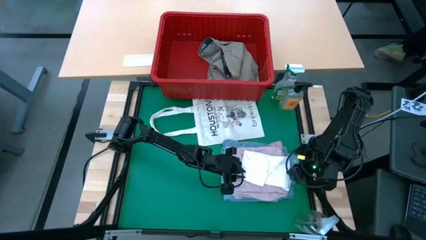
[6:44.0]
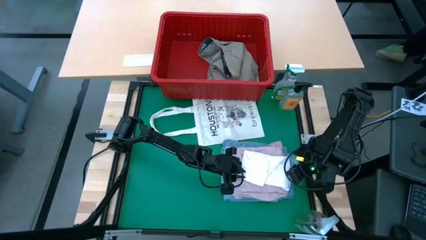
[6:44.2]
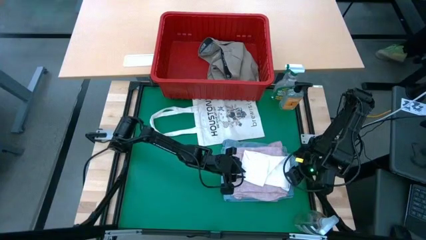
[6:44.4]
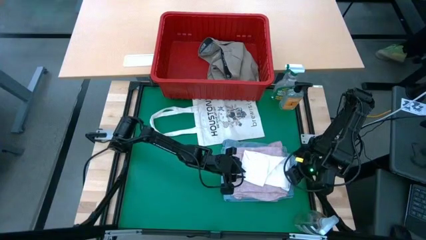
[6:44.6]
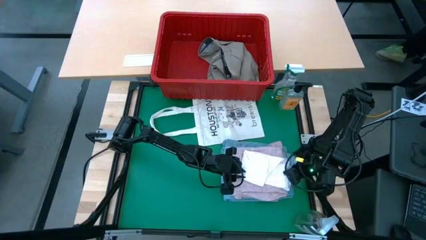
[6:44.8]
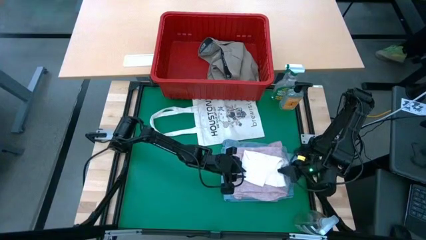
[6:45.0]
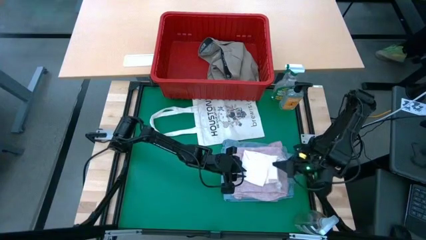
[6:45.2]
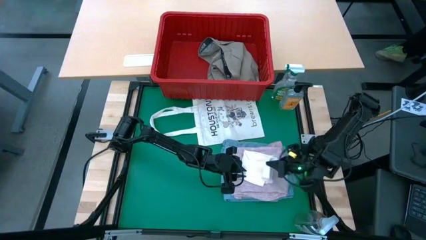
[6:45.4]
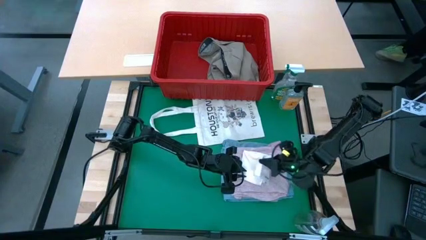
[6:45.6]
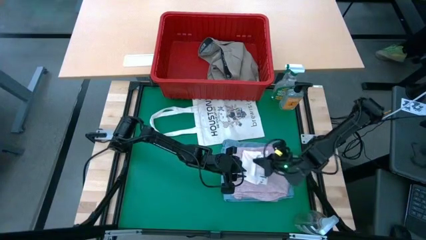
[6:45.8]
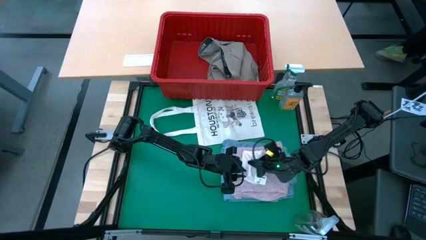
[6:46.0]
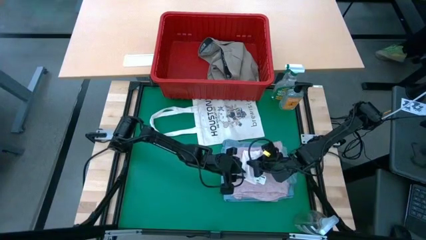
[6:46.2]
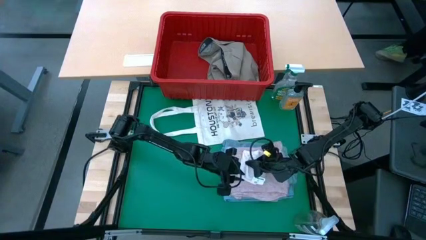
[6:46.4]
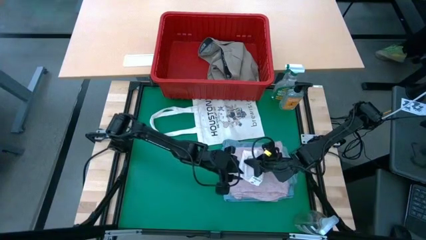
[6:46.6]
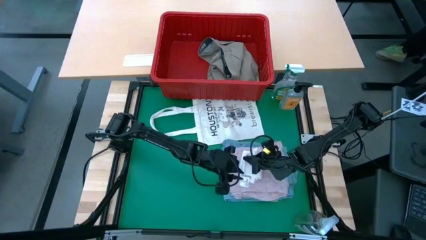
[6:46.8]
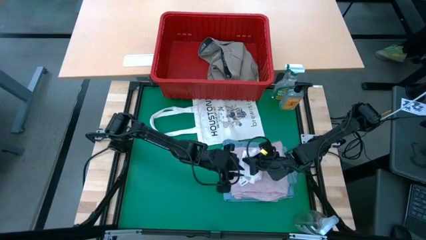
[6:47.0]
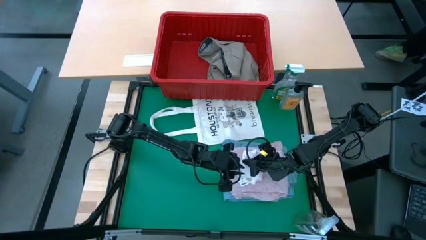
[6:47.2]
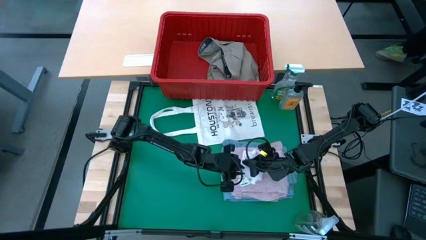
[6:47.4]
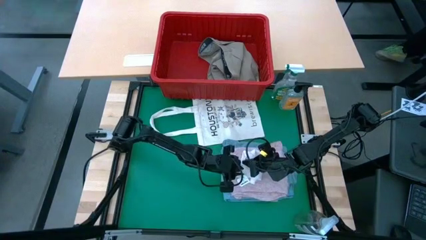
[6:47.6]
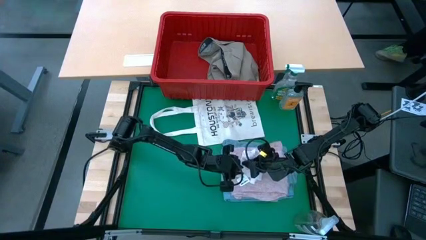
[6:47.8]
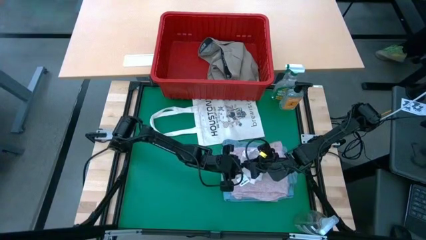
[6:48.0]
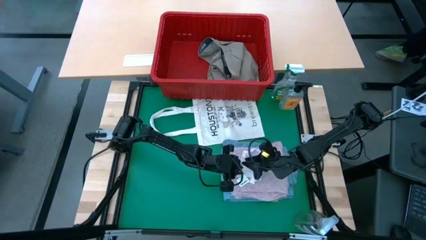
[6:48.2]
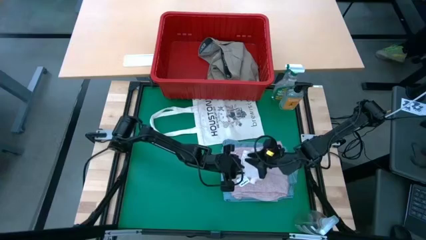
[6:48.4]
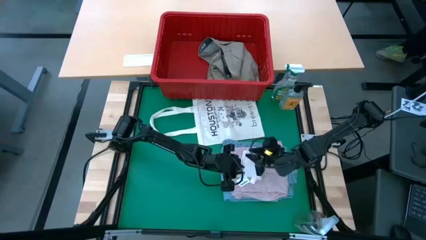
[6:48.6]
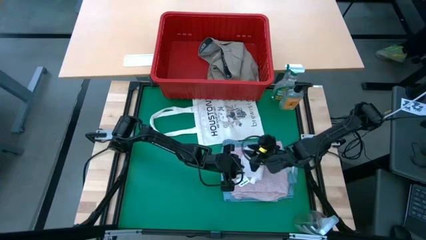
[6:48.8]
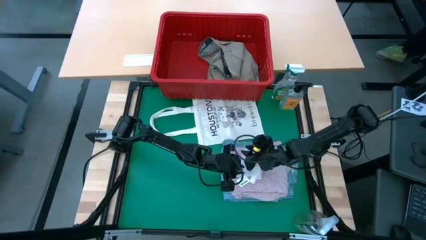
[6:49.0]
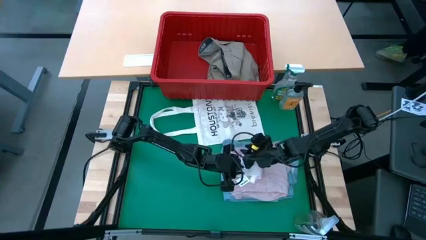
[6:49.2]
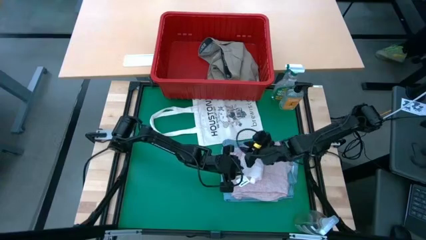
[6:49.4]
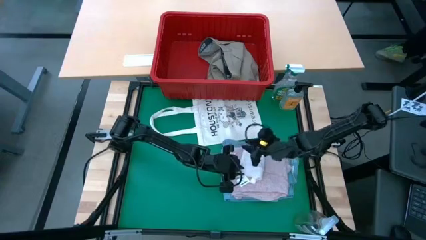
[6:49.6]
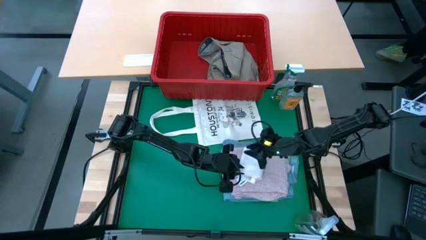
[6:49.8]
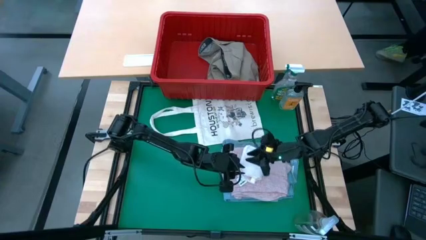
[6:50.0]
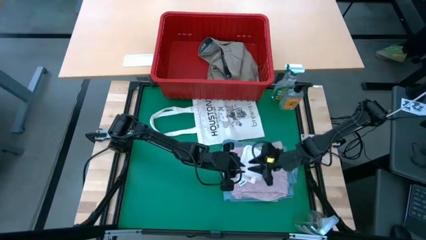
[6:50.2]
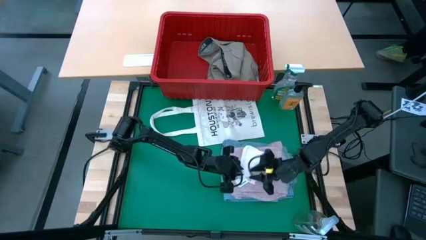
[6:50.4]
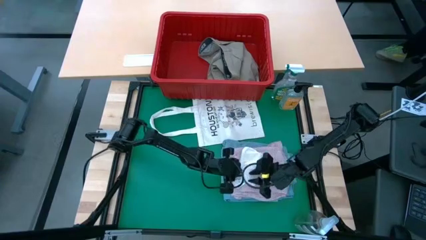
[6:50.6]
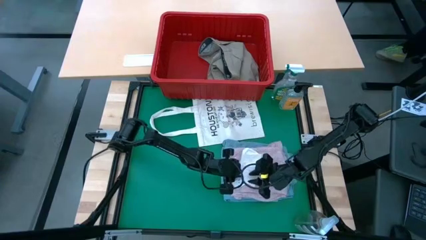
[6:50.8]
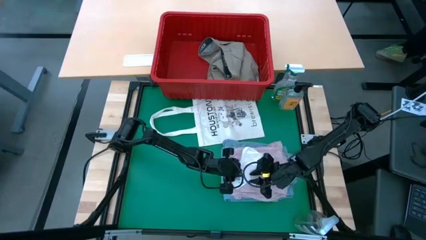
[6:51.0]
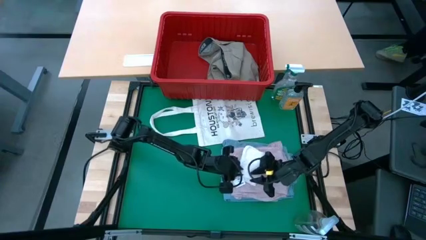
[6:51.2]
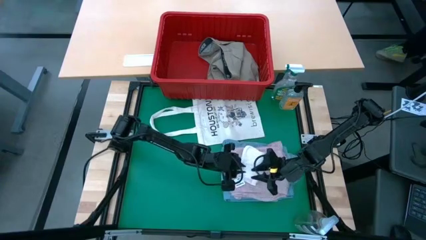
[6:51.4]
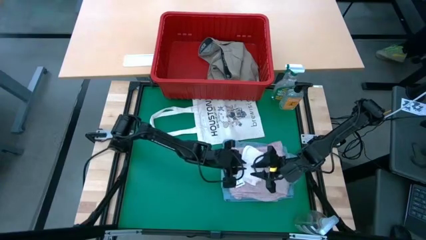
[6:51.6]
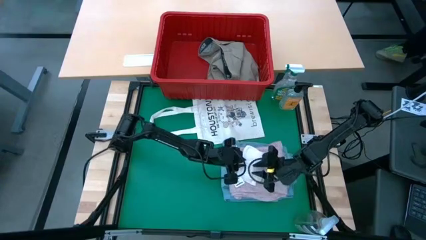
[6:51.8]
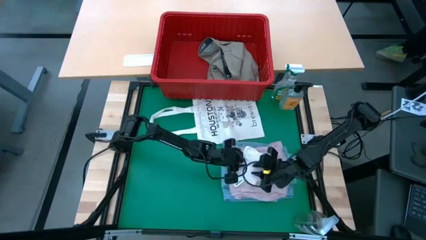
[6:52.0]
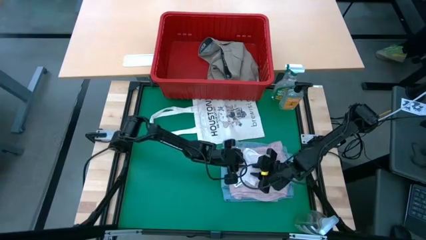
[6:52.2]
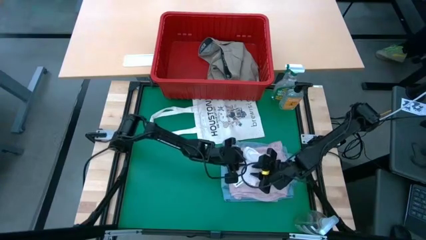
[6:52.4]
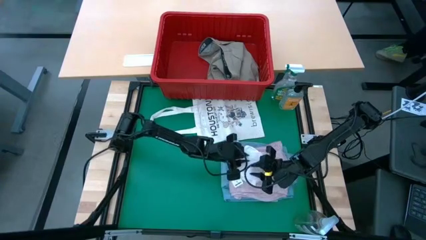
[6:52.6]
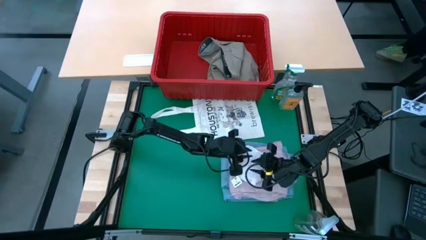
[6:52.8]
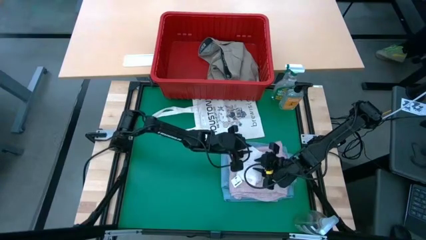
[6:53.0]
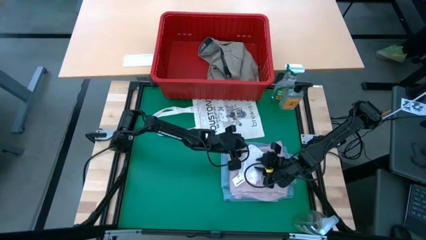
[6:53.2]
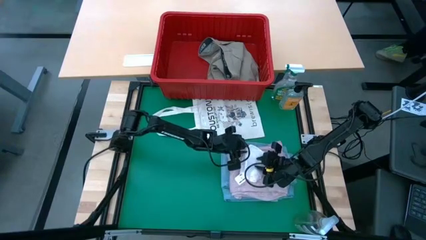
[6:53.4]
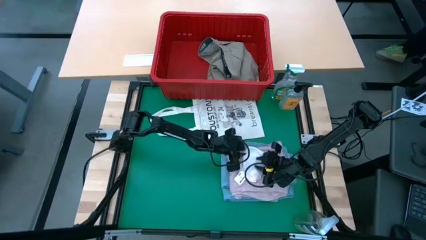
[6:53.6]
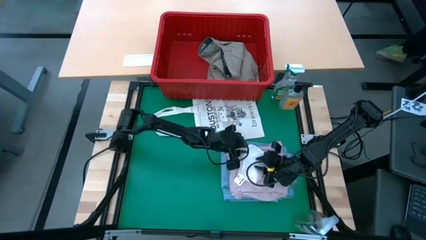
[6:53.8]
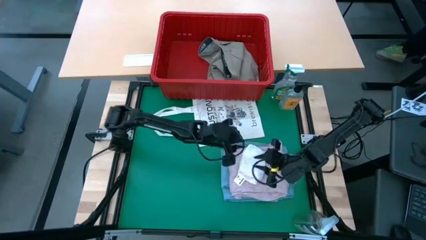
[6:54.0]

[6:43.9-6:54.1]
Task: Fold Laundry from Bin
Fold the white underwear from the red laundry basket
